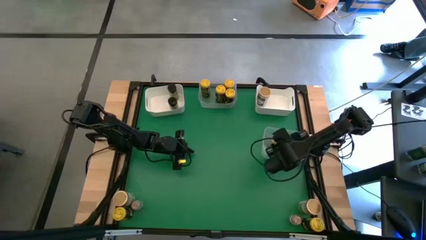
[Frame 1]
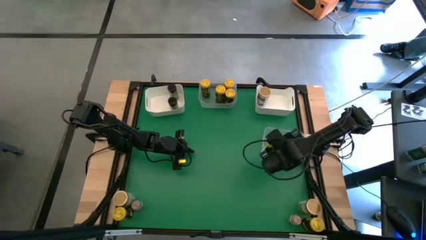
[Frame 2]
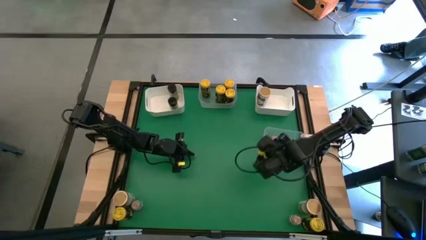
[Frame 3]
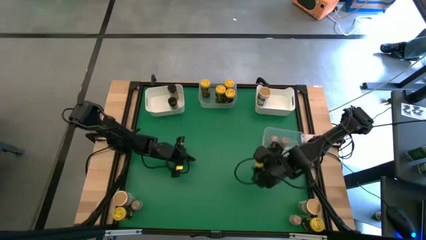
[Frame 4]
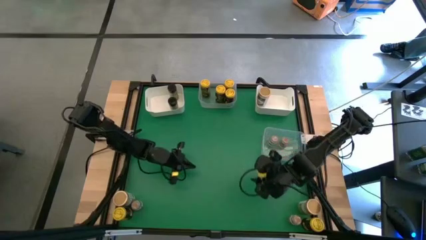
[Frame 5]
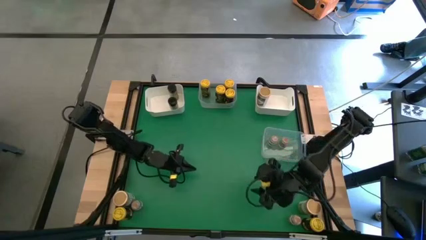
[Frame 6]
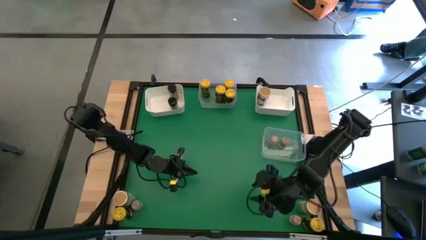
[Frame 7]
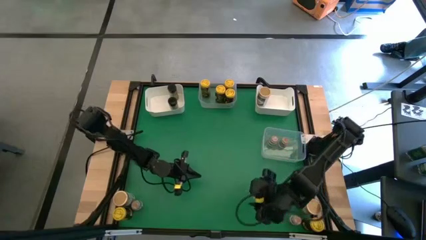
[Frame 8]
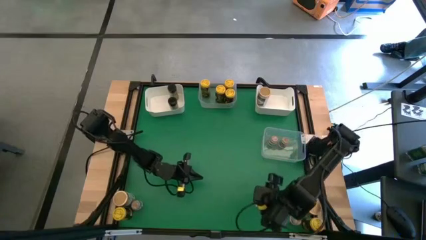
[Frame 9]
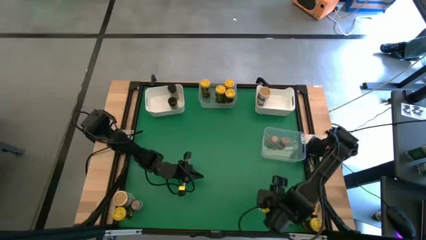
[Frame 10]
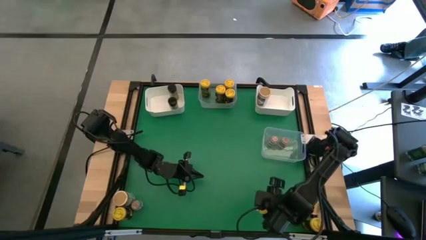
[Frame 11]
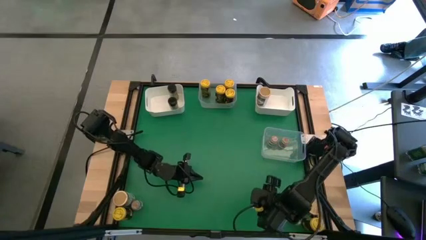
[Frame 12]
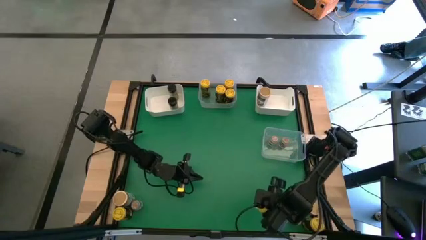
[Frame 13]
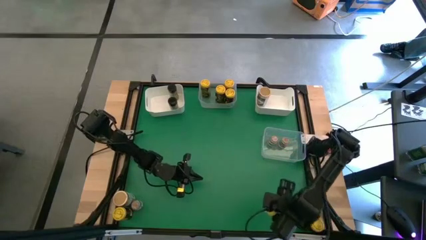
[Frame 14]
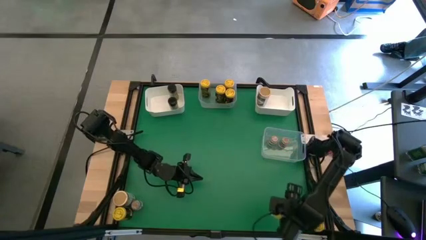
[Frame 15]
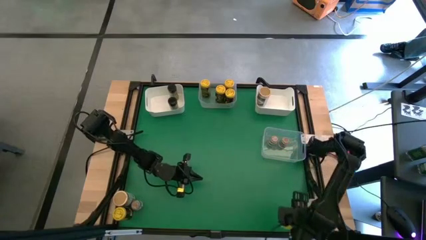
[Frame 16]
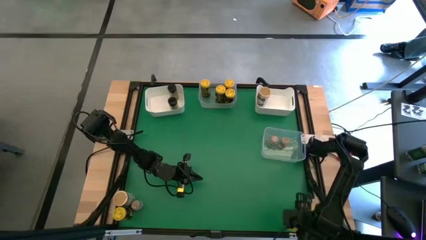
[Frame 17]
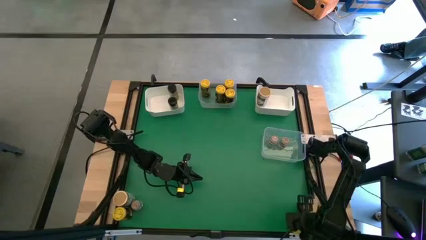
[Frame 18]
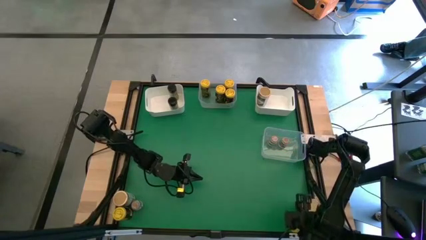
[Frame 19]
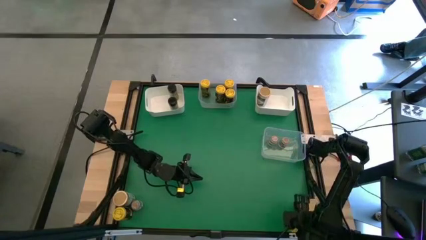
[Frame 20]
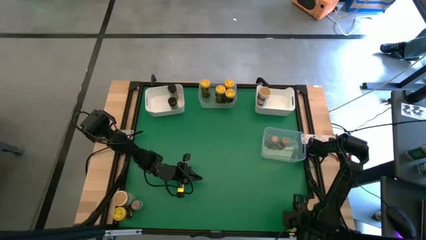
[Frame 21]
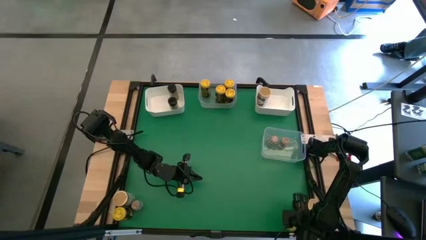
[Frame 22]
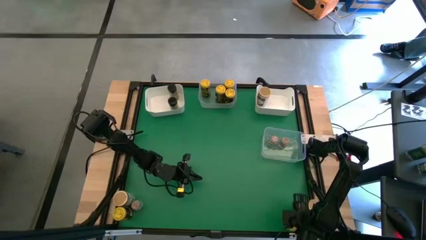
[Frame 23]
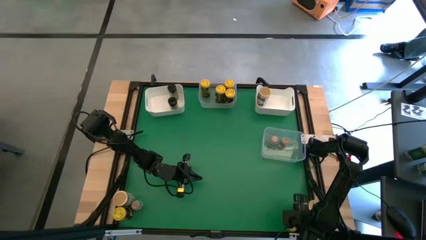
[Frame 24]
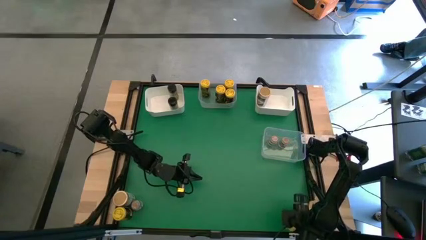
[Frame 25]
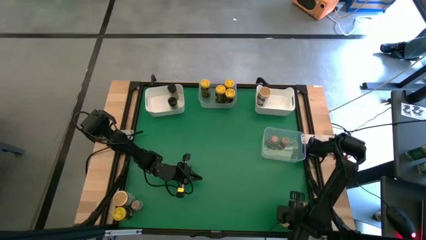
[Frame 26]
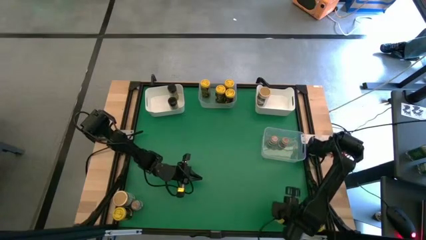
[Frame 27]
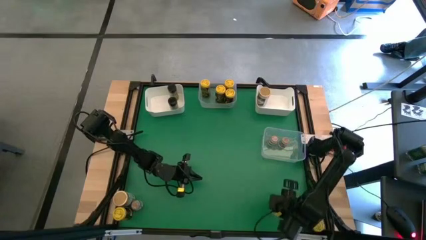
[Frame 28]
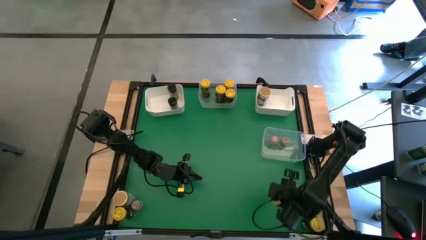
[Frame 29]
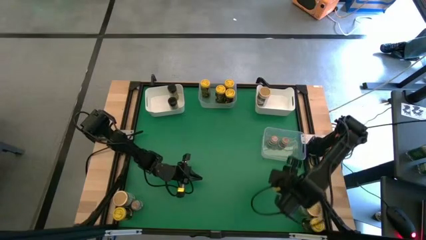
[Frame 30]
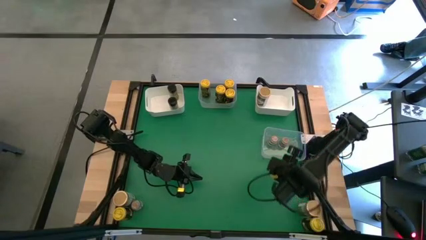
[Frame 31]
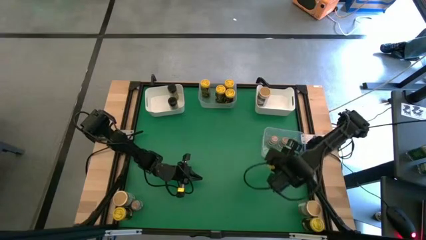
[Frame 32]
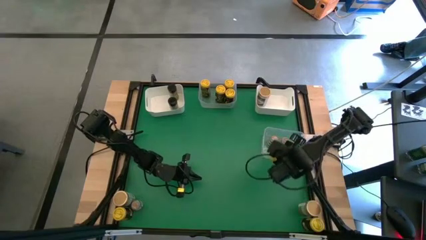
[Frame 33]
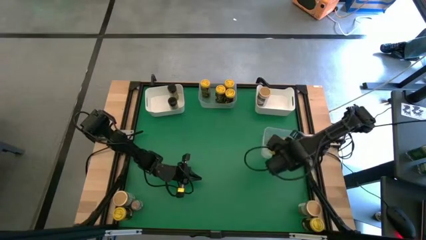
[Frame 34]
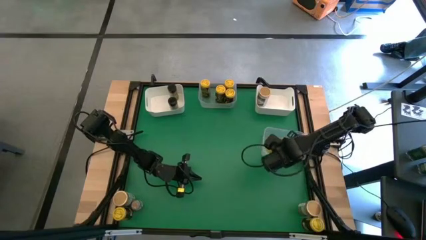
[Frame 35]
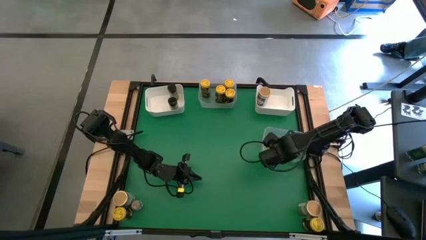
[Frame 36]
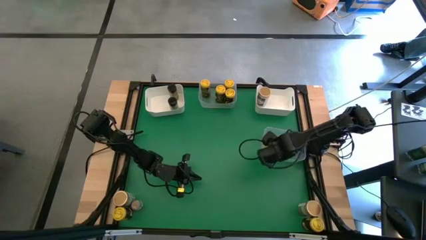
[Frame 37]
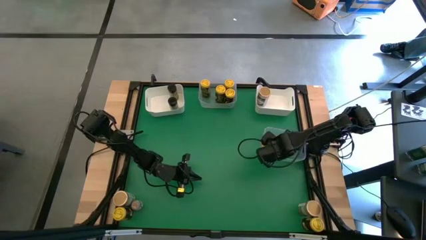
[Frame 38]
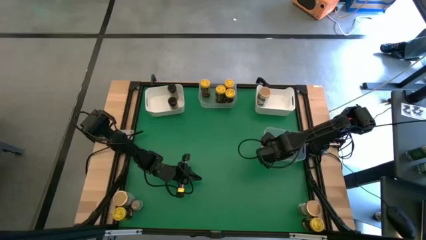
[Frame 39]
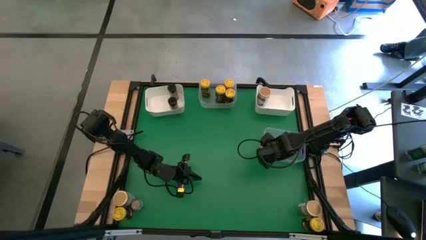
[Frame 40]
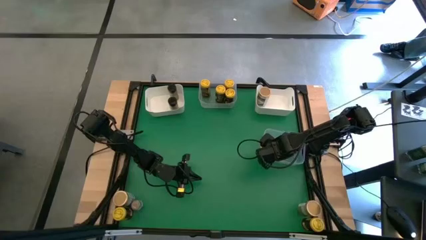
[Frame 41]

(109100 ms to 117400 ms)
Task: Sort spices by type
Put the transparent seasoning bottle into the bottom transparent bin

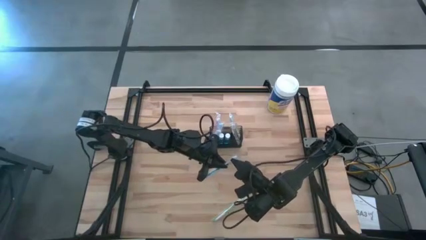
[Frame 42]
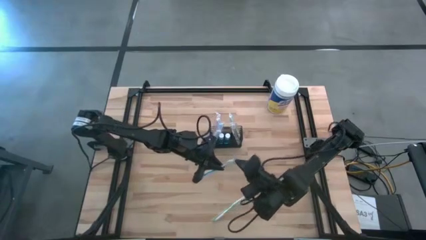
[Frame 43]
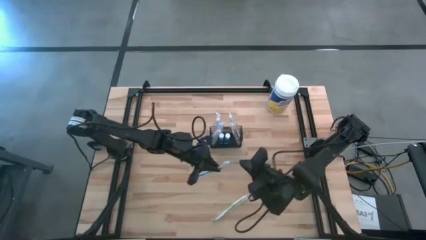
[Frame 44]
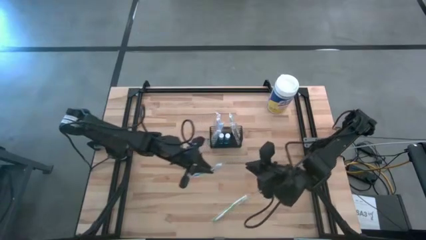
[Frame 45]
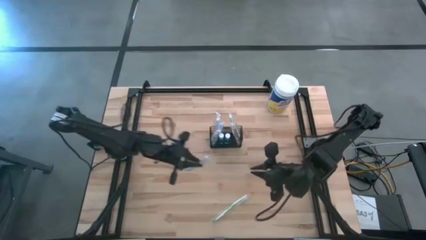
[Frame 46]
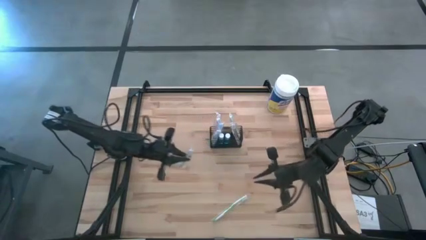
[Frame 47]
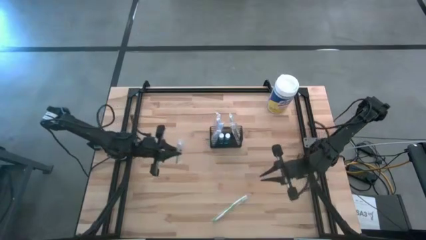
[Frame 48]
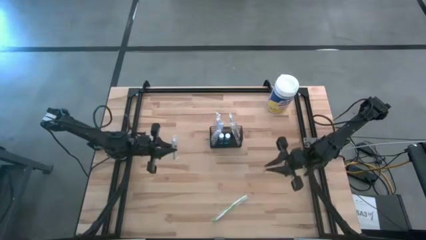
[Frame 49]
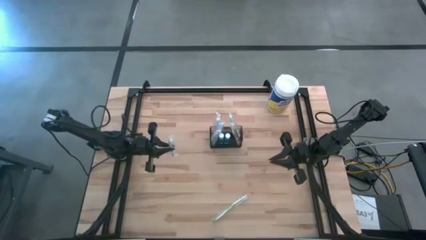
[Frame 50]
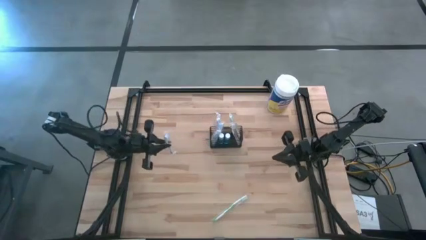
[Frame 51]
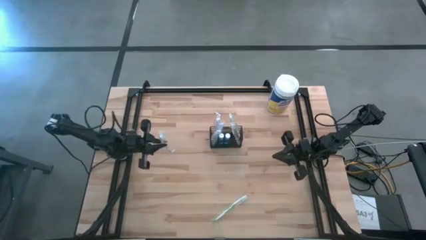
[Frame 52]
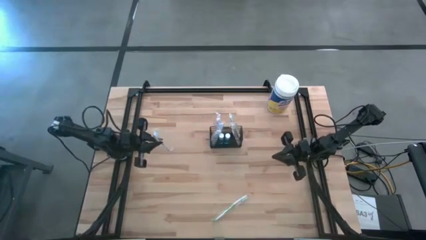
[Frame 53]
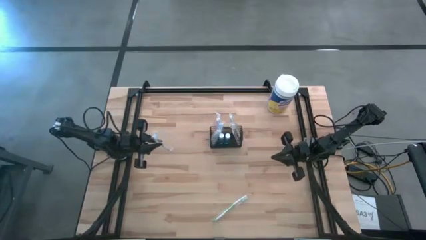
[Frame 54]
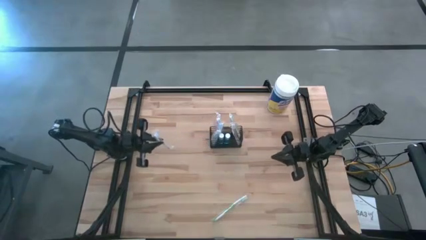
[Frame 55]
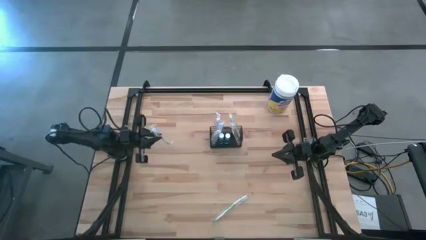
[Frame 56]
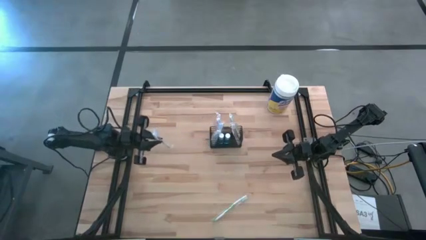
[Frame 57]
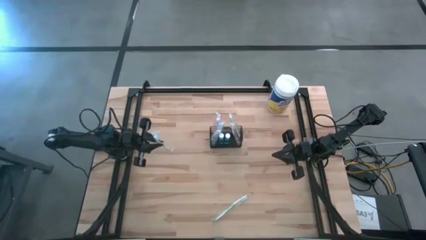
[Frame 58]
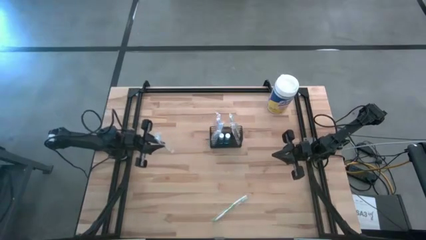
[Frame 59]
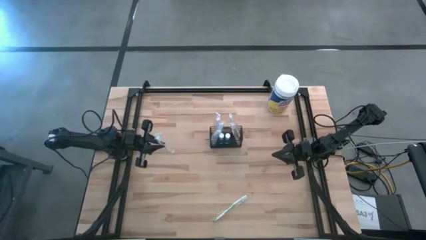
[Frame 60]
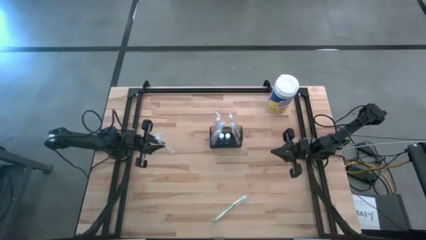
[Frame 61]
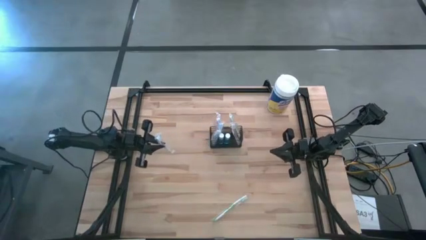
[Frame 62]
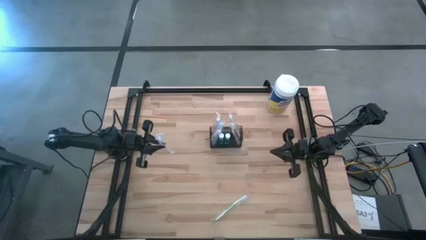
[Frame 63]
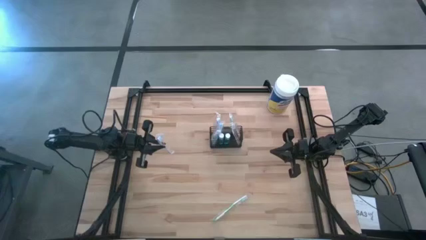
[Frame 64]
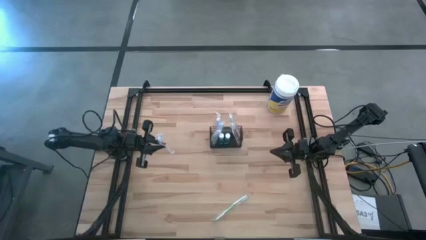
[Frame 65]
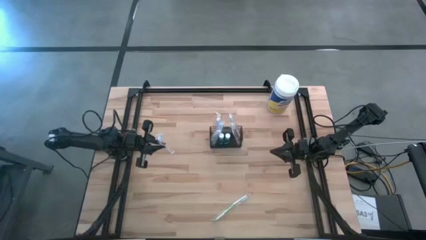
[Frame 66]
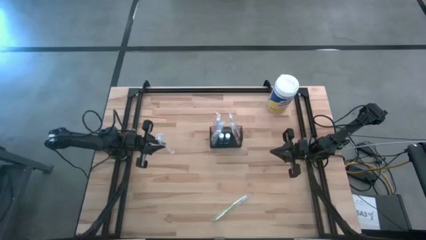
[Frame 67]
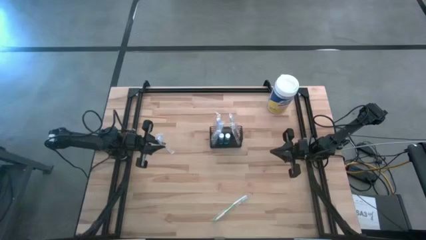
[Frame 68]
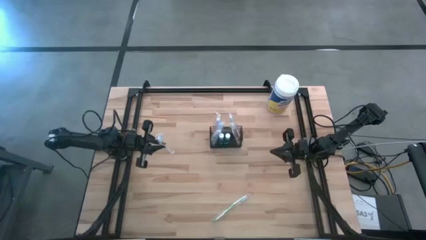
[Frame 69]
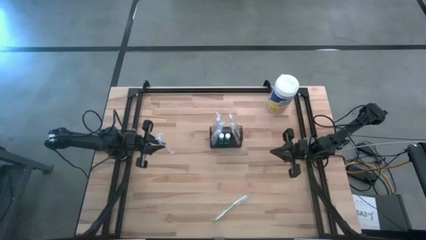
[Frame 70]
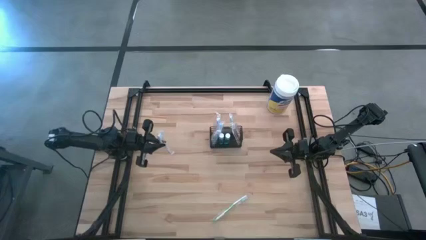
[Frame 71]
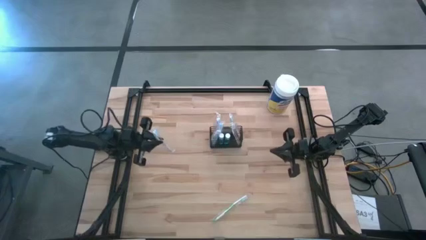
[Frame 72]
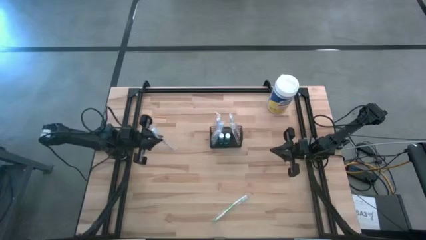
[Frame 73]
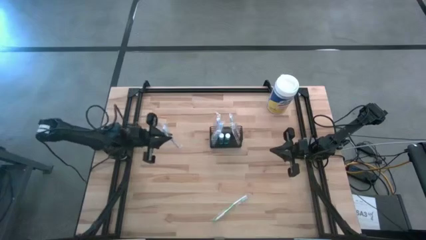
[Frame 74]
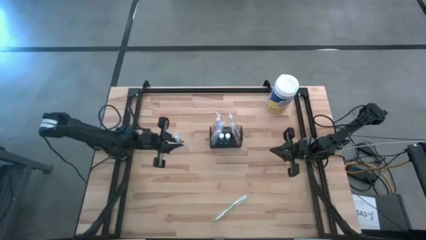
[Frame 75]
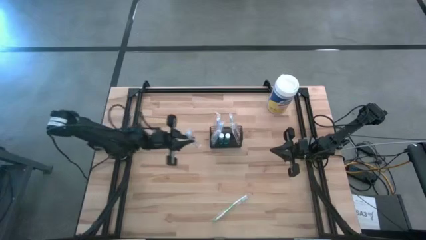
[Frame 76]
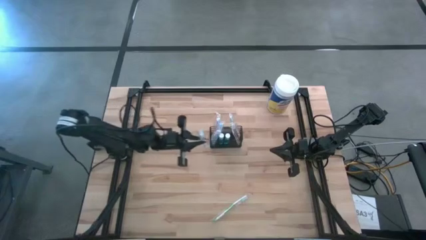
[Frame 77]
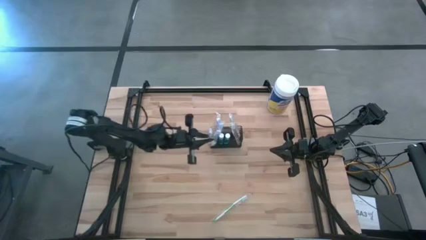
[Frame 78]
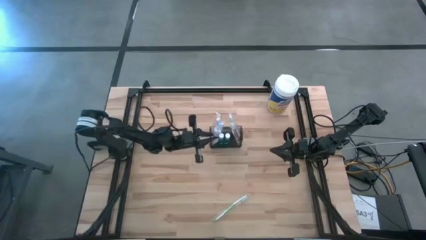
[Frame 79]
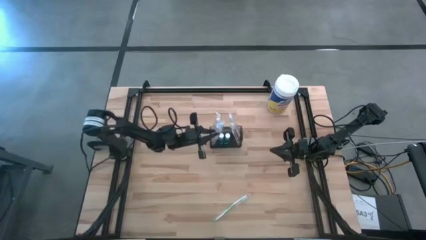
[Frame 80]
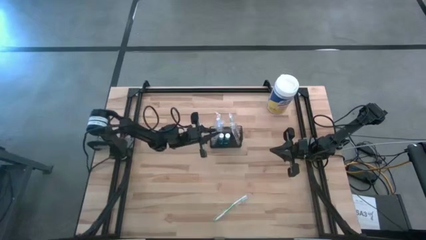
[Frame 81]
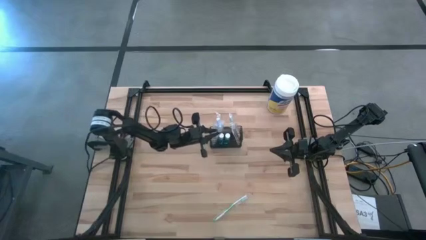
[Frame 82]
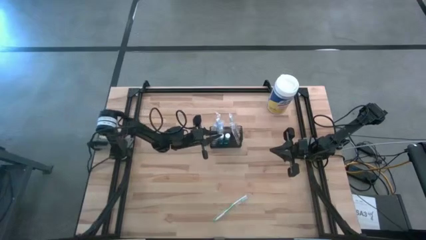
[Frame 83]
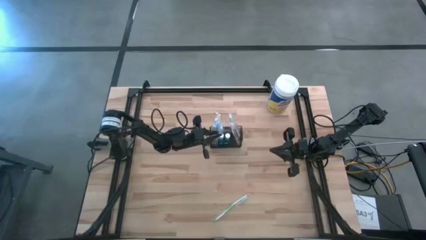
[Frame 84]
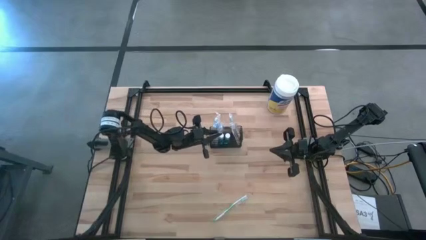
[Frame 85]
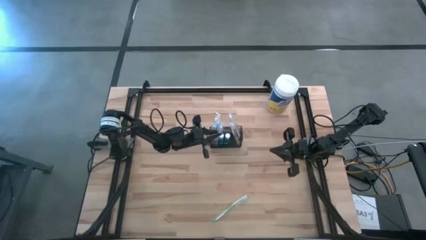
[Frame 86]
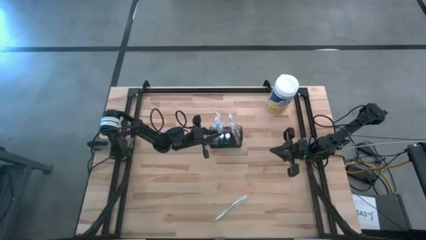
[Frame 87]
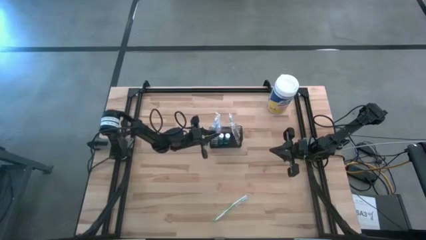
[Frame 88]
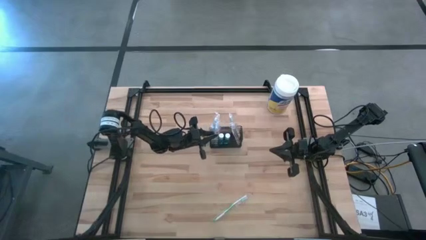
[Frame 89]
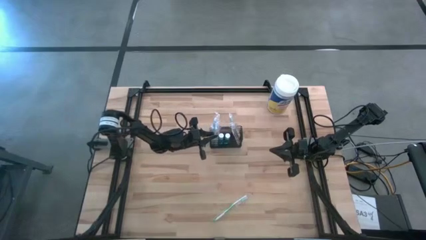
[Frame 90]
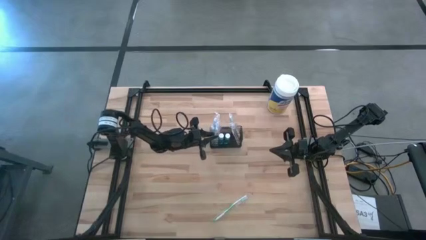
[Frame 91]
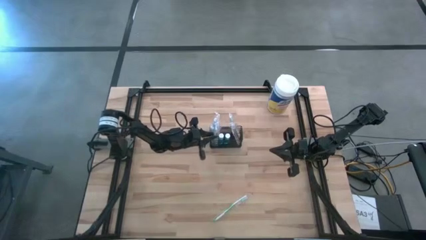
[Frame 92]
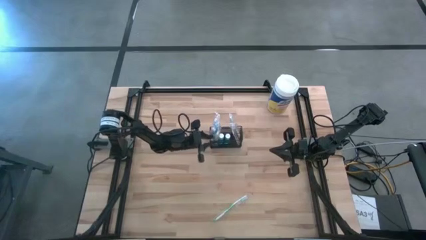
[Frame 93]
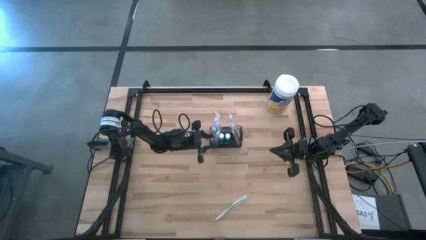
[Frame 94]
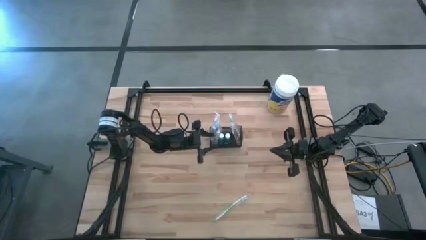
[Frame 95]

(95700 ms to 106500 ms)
Task: Pick & Place toothbrushing station
Put the blue toothbrush into the black wire organizer
